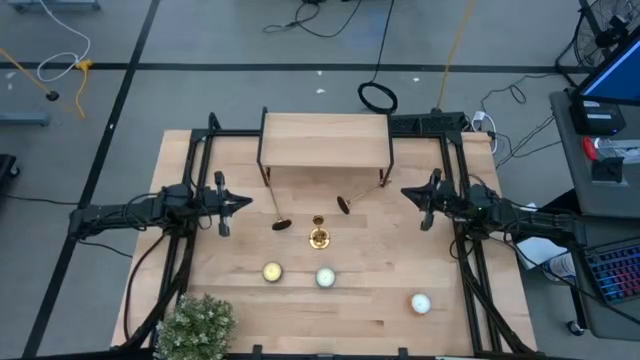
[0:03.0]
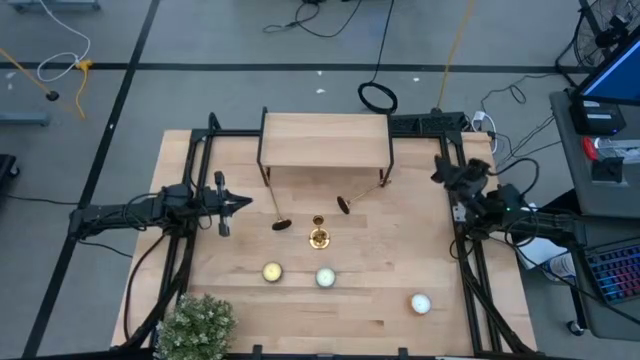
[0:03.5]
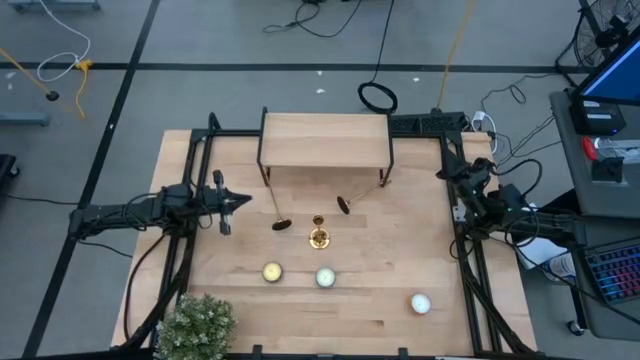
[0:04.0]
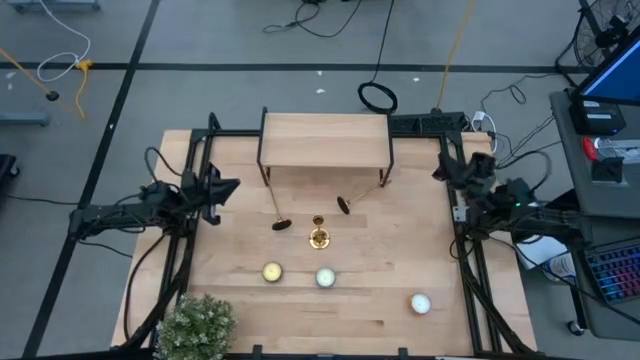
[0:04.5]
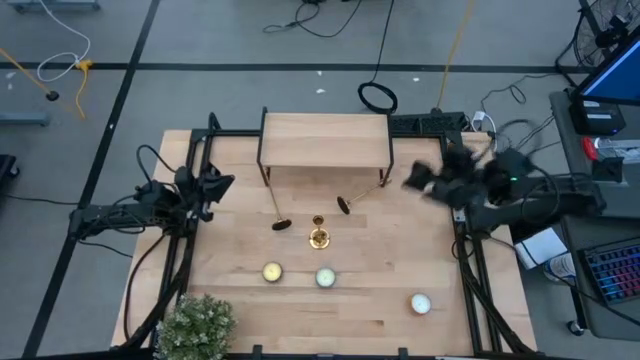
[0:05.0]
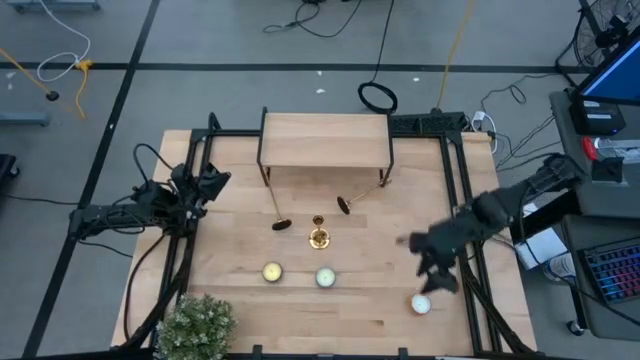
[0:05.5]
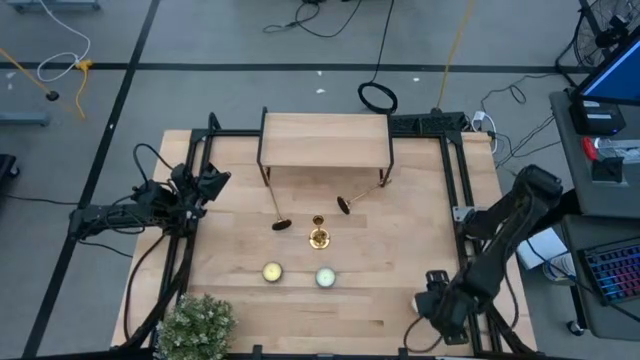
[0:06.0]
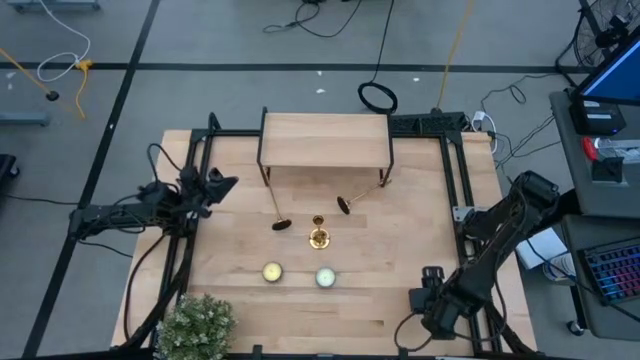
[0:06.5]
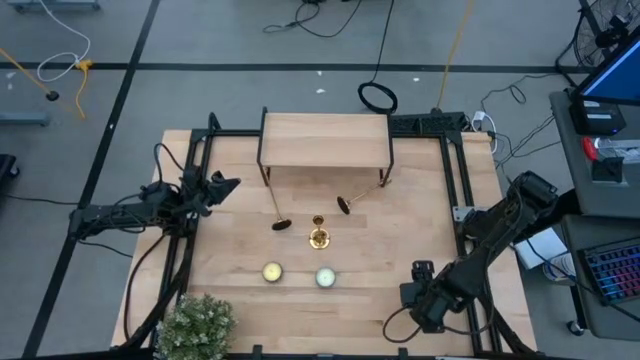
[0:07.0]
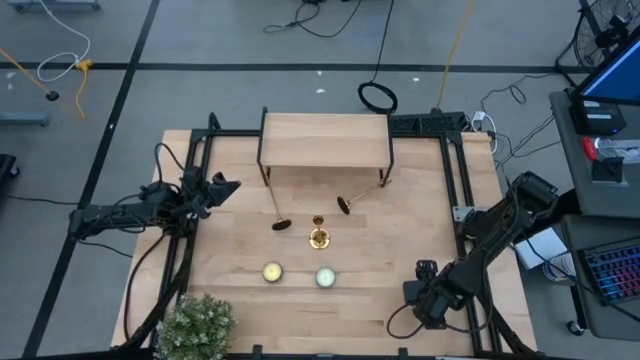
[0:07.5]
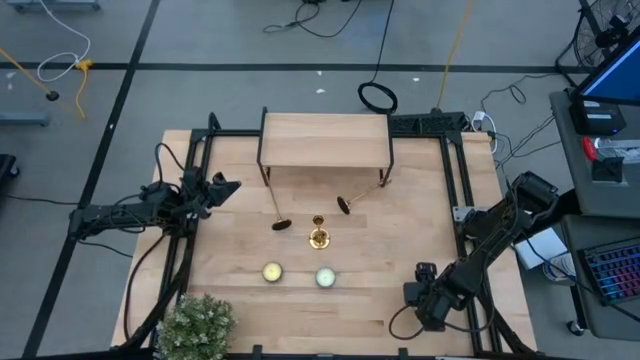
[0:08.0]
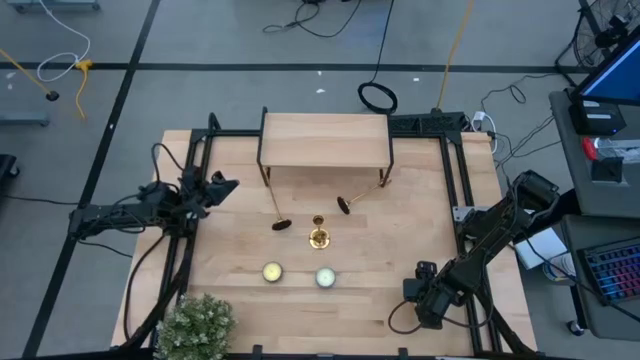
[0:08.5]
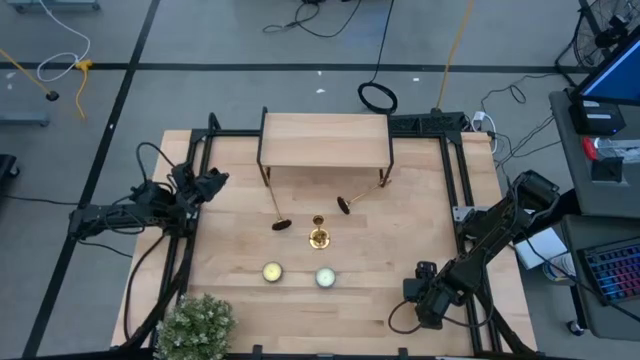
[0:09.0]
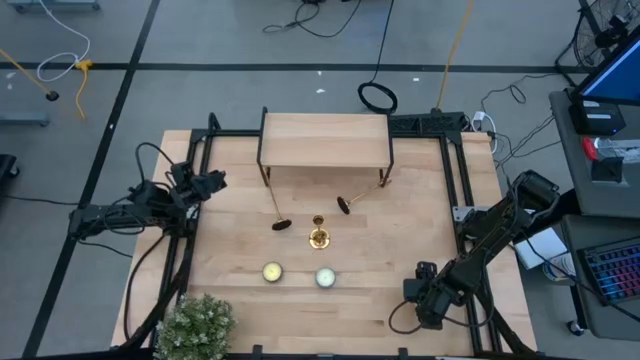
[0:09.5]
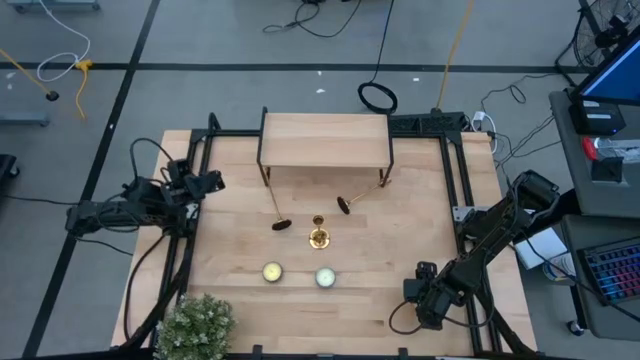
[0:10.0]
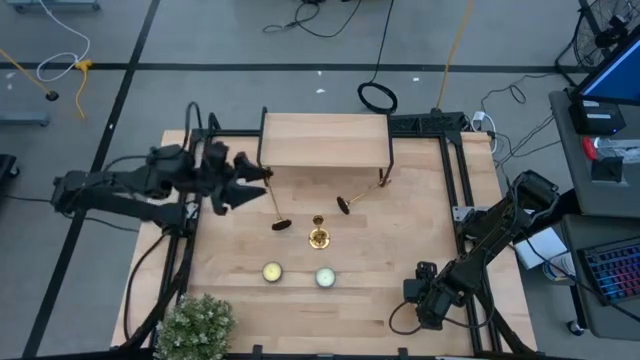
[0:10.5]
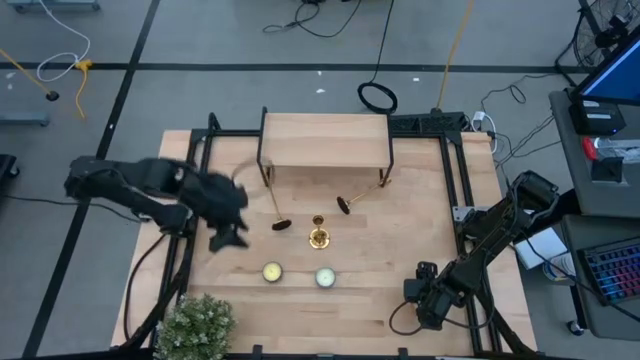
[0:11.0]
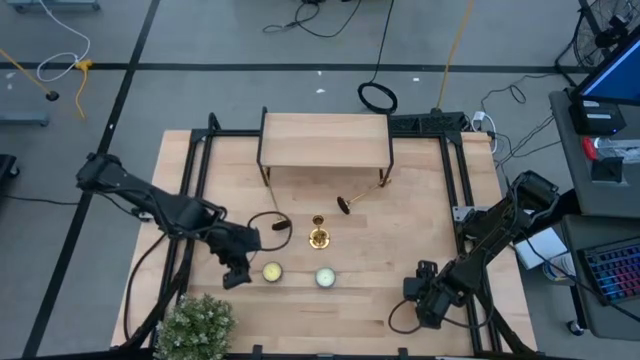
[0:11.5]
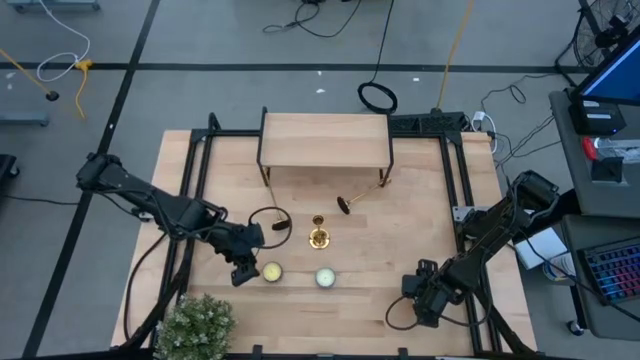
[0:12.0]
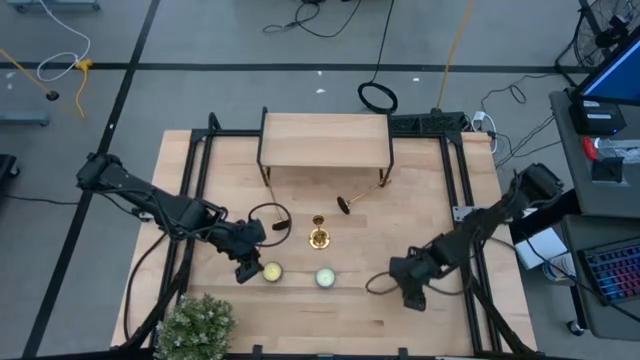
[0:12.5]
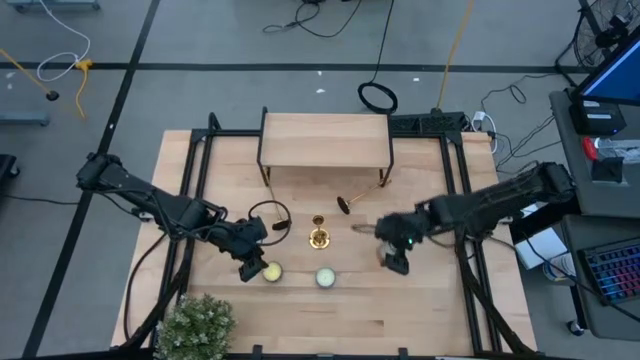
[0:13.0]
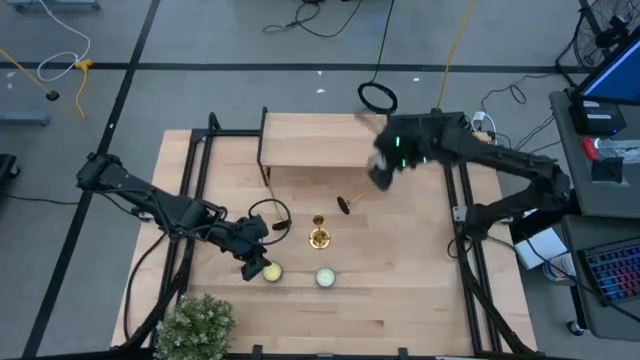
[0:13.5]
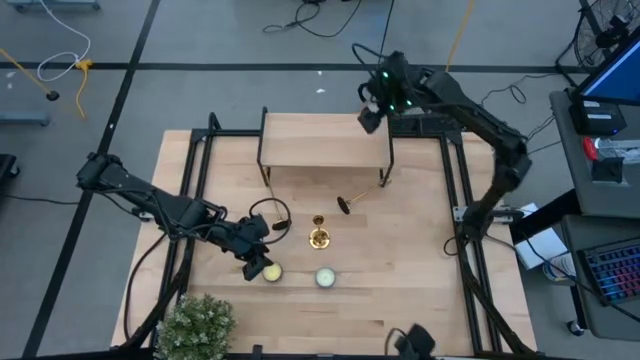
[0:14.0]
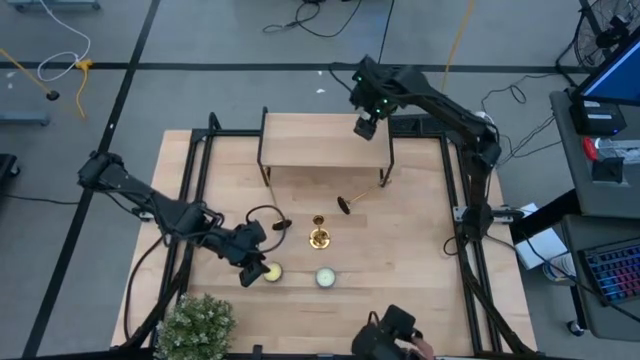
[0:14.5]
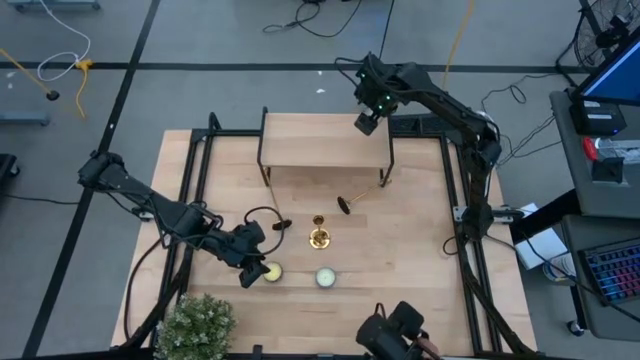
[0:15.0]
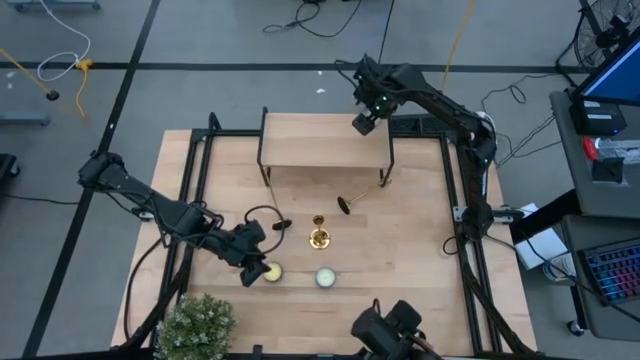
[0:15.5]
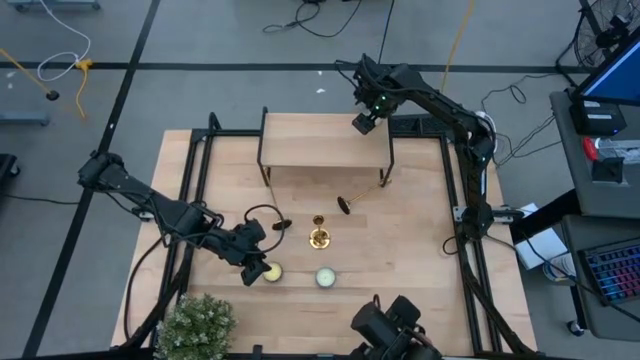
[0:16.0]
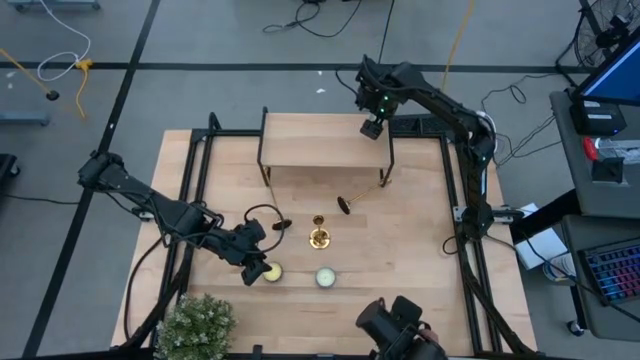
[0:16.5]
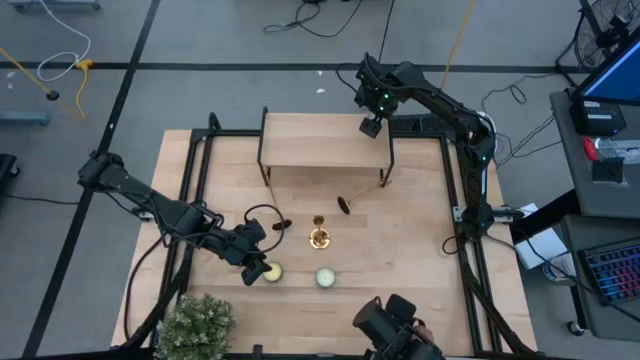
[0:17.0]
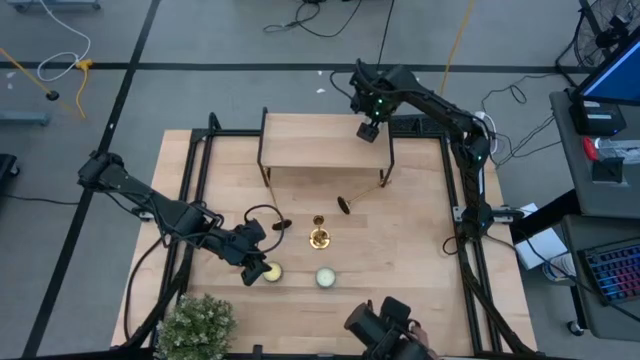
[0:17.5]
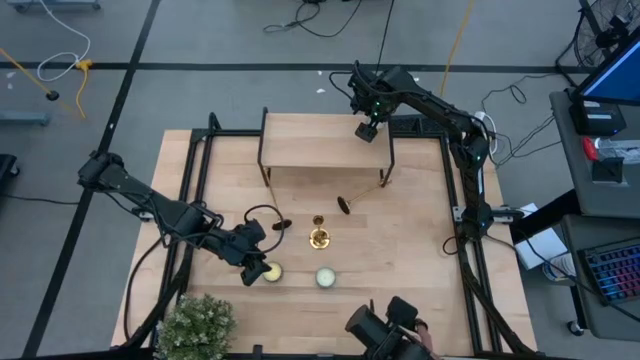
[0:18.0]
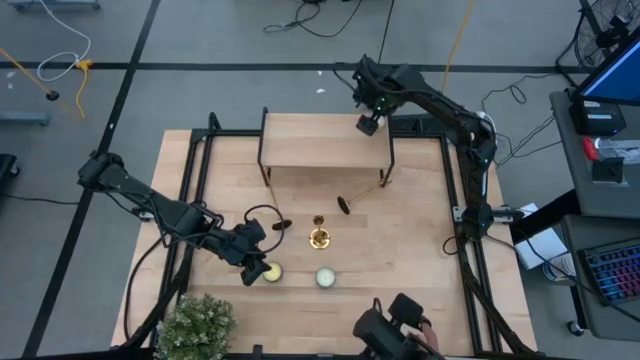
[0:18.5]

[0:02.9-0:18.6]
Task: Pick & Place candle stick holders
Put the orange scented candle on the shelf

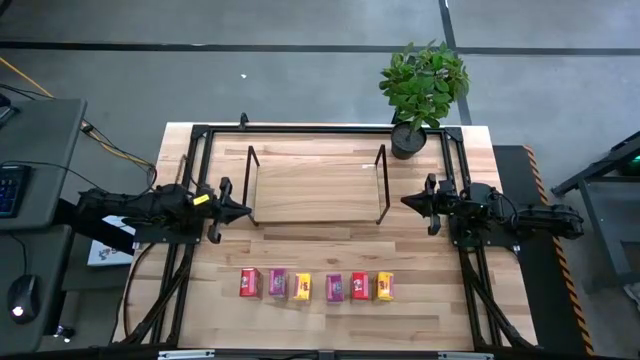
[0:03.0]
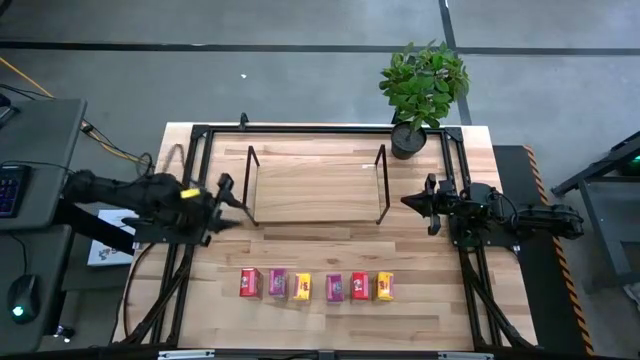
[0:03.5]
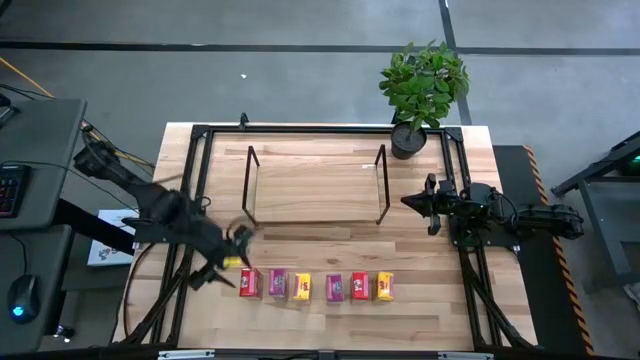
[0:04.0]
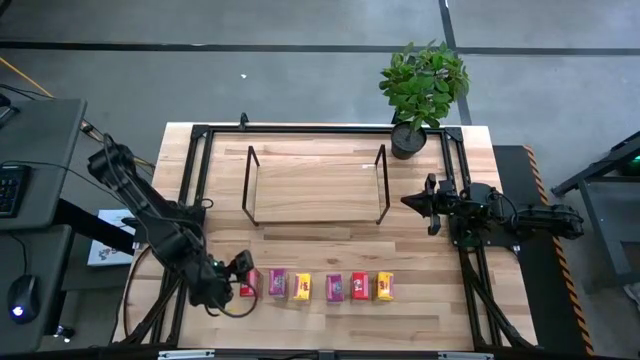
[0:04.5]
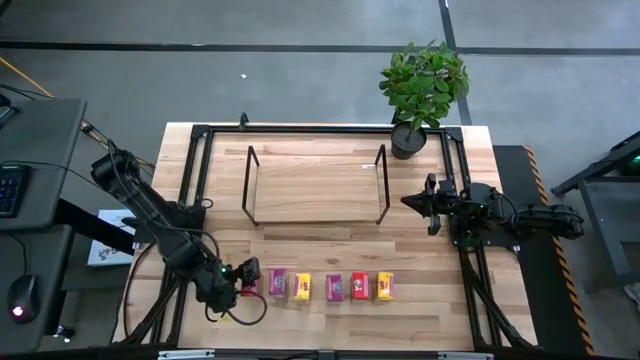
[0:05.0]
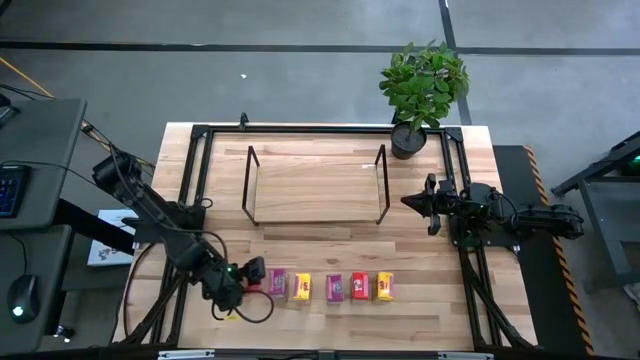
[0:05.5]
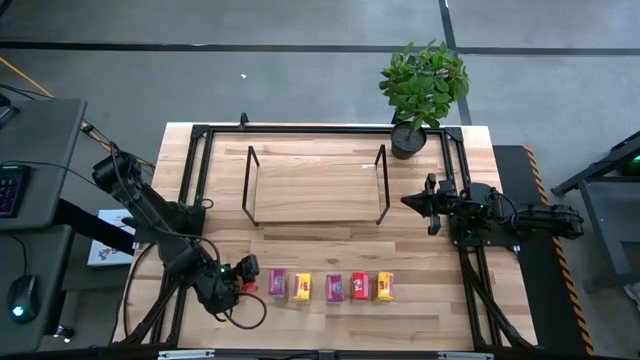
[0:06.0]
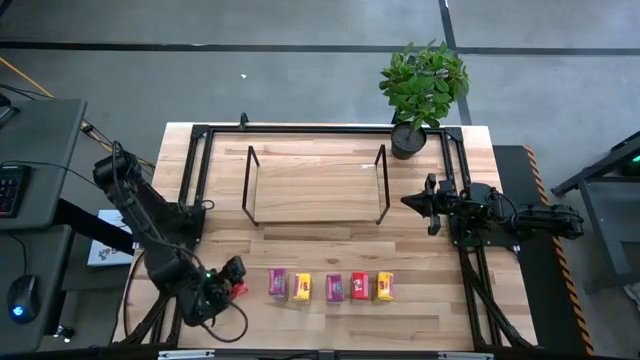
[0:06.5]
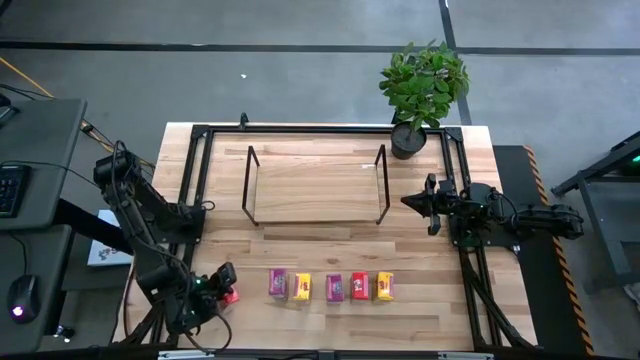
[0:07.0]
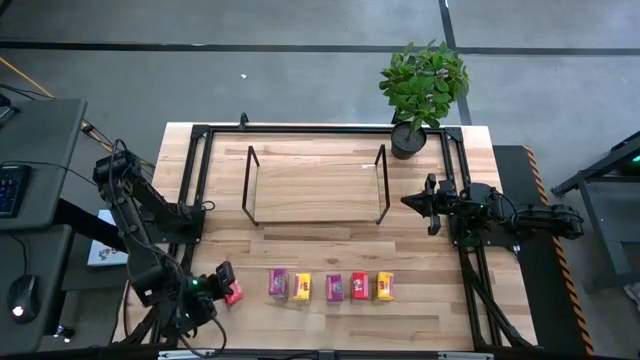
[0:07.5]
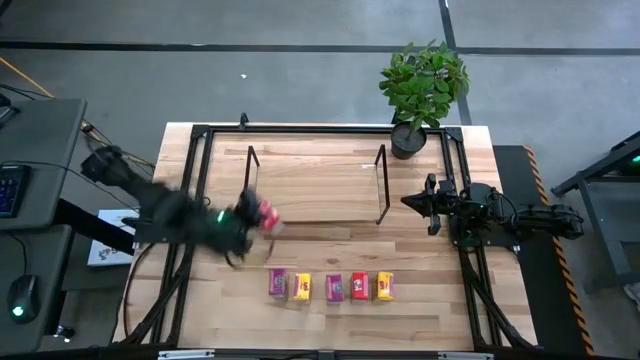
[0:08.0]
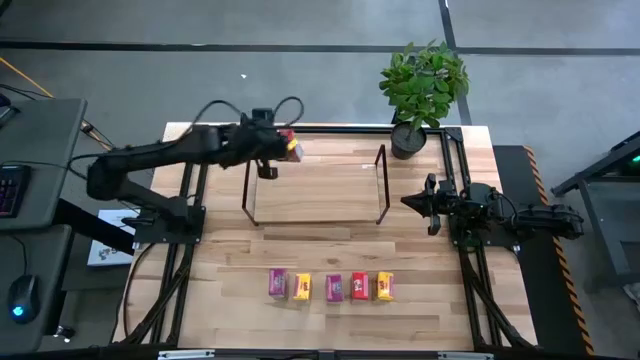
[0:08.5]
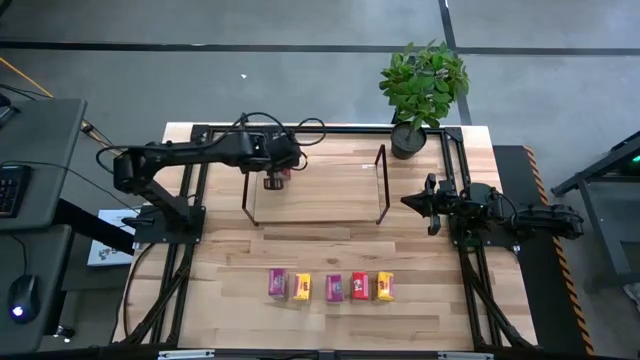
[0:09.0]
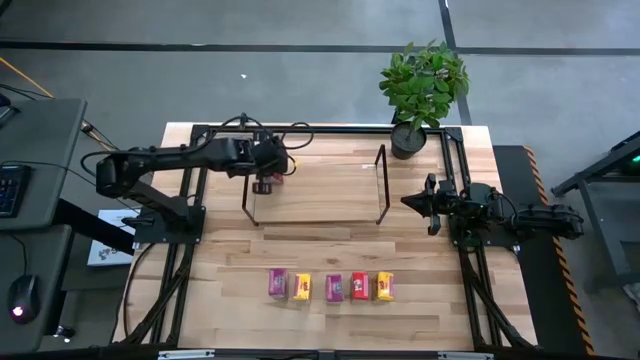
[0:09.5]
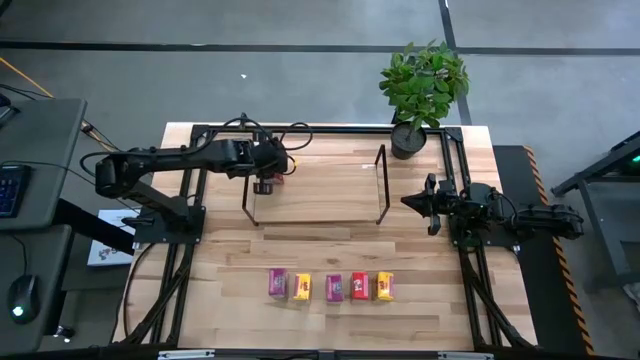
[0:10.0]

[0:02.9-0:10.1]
Task: Stack cereal on shelf
Put the red cereal box on the shelf
